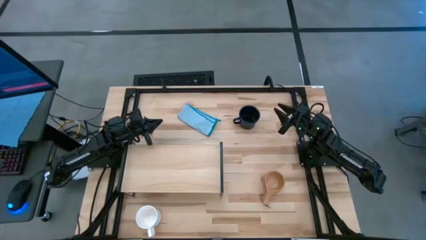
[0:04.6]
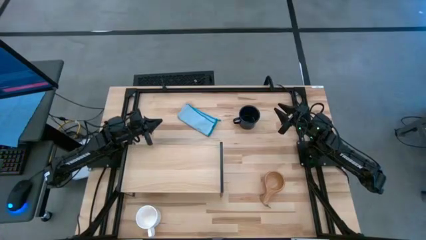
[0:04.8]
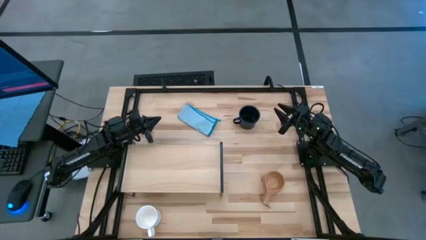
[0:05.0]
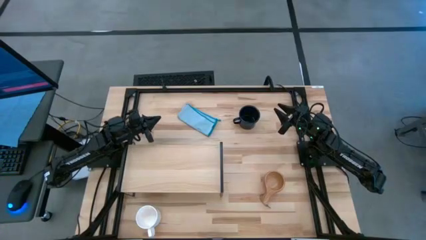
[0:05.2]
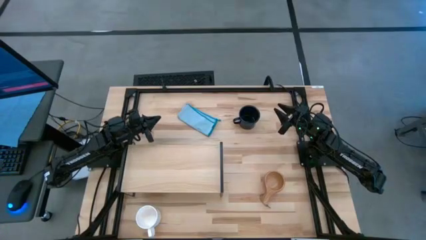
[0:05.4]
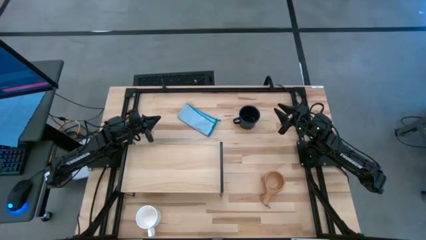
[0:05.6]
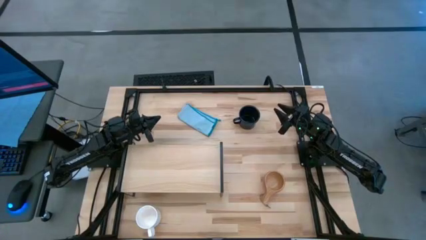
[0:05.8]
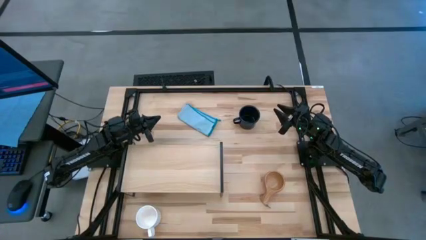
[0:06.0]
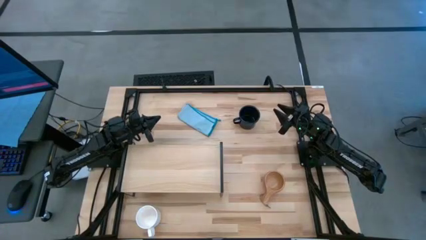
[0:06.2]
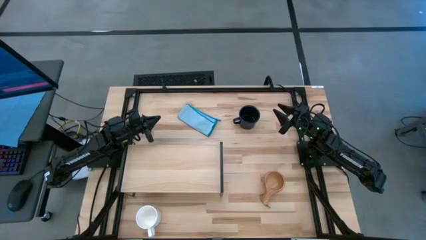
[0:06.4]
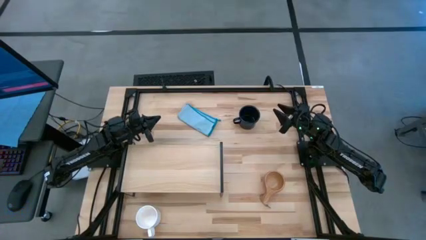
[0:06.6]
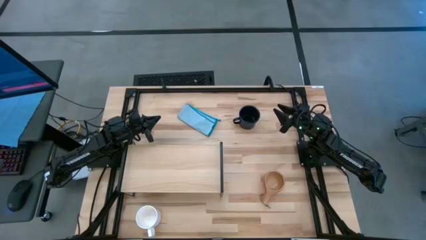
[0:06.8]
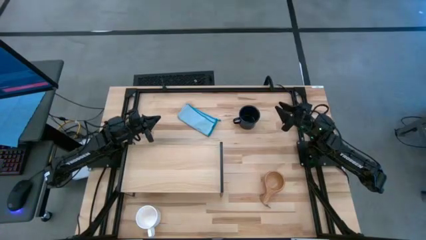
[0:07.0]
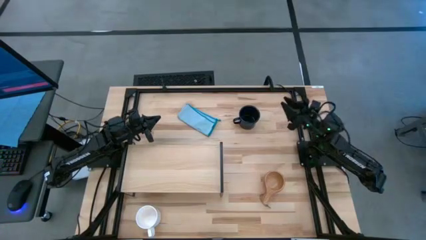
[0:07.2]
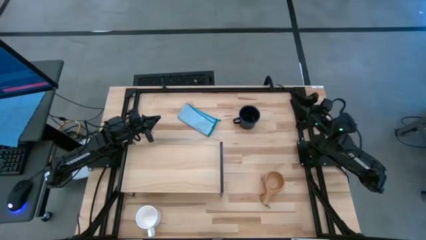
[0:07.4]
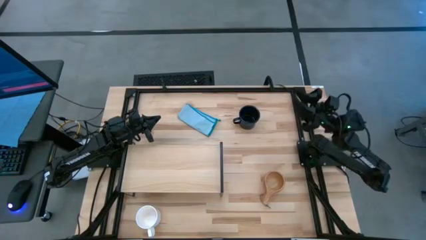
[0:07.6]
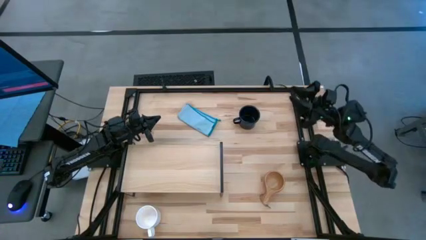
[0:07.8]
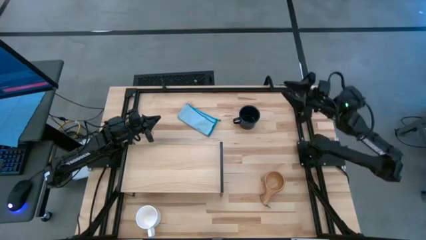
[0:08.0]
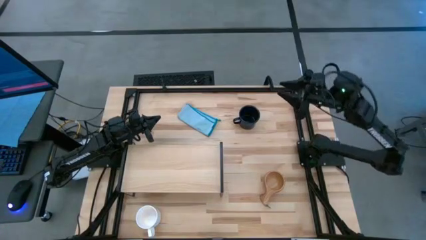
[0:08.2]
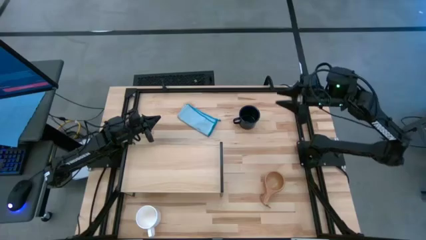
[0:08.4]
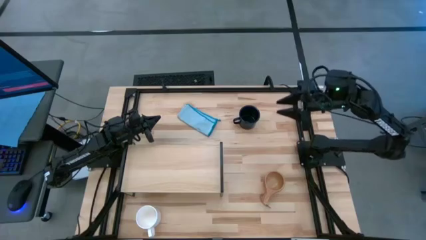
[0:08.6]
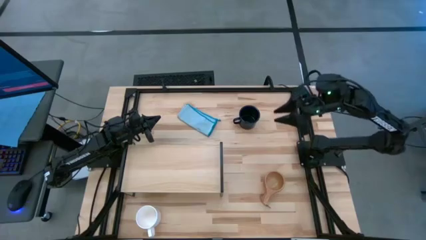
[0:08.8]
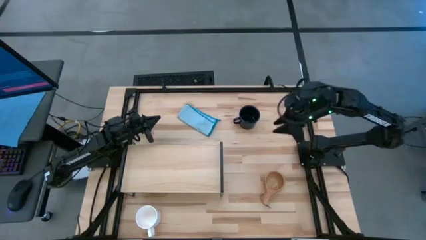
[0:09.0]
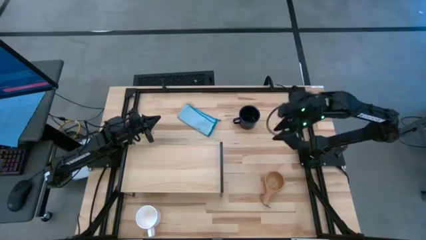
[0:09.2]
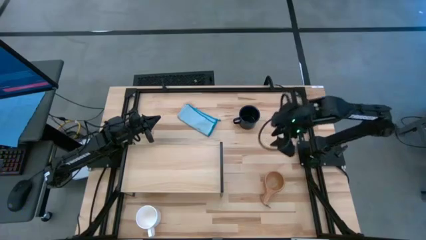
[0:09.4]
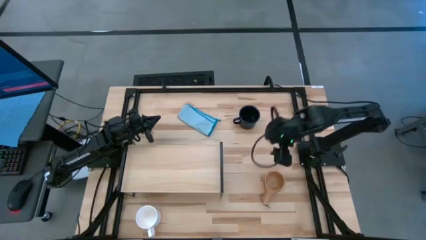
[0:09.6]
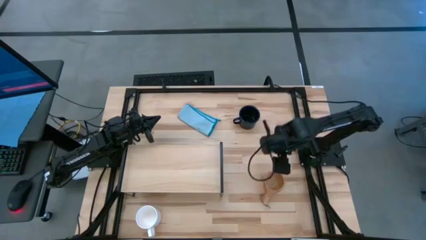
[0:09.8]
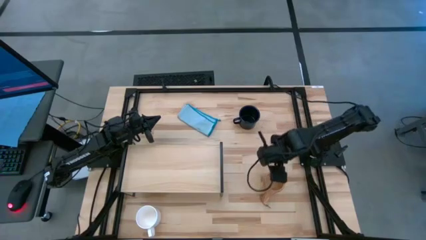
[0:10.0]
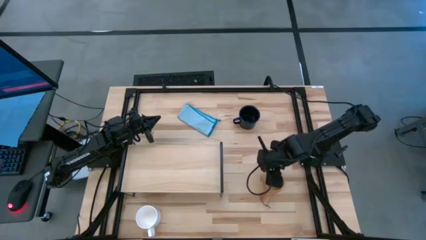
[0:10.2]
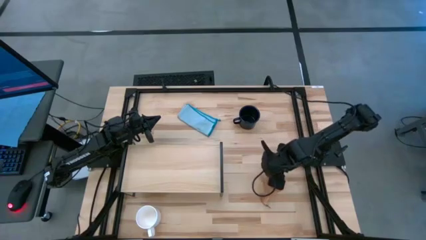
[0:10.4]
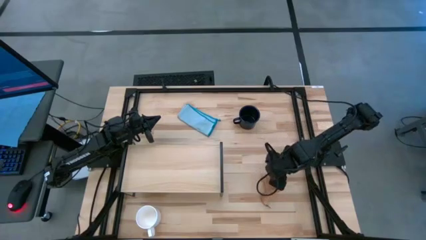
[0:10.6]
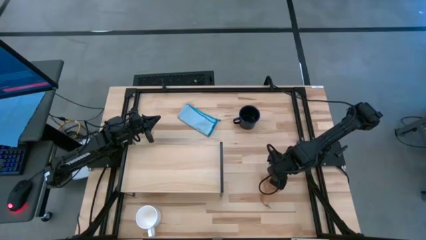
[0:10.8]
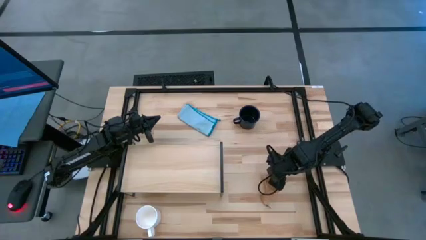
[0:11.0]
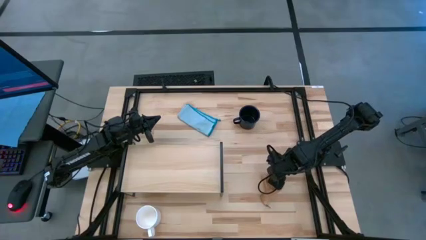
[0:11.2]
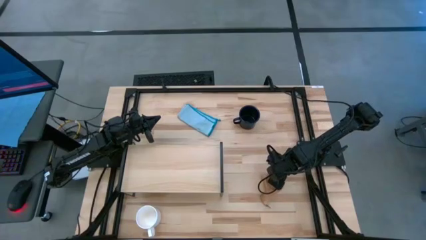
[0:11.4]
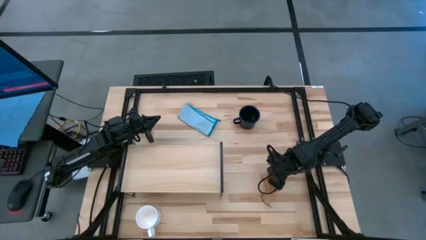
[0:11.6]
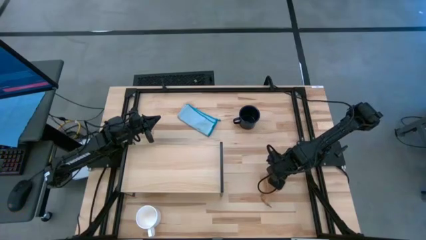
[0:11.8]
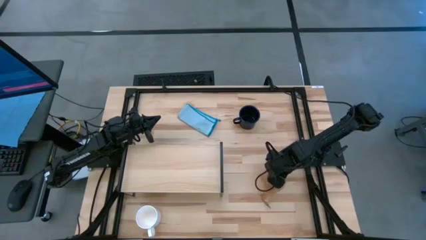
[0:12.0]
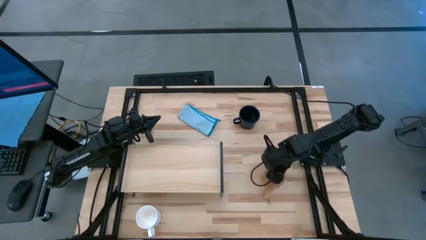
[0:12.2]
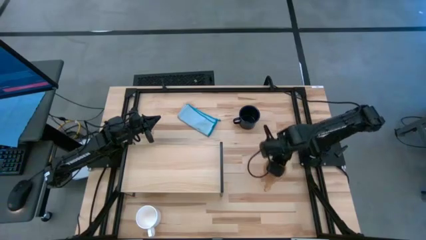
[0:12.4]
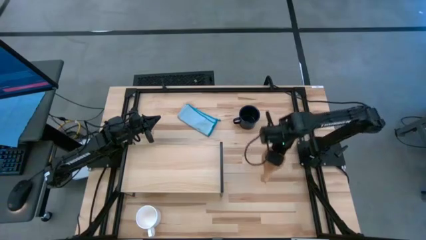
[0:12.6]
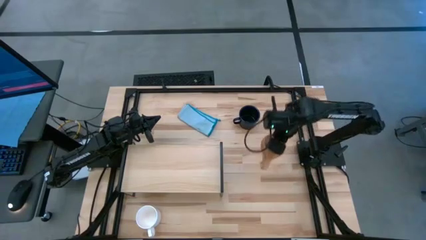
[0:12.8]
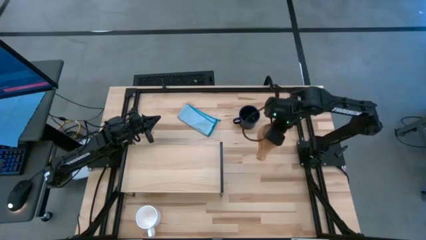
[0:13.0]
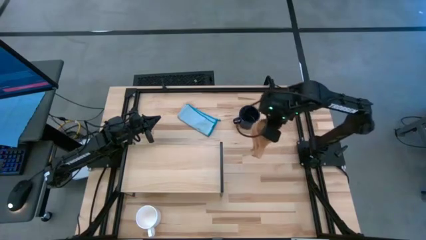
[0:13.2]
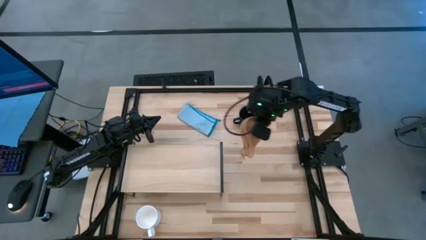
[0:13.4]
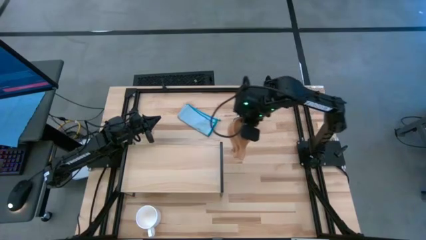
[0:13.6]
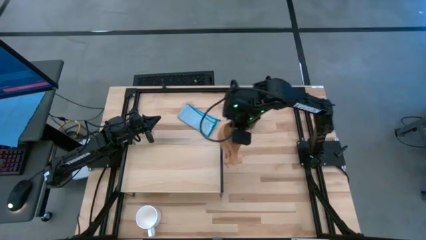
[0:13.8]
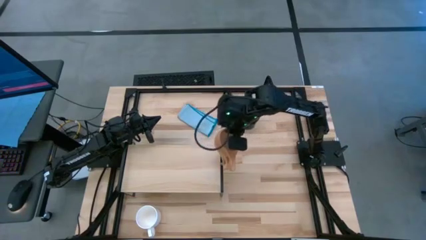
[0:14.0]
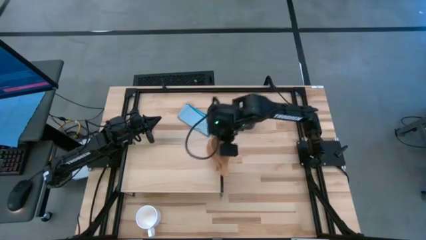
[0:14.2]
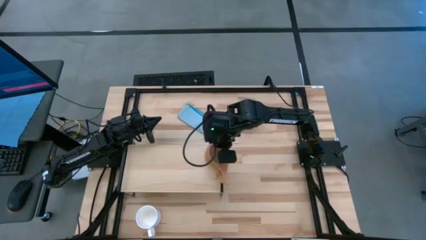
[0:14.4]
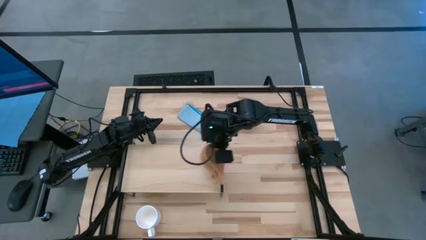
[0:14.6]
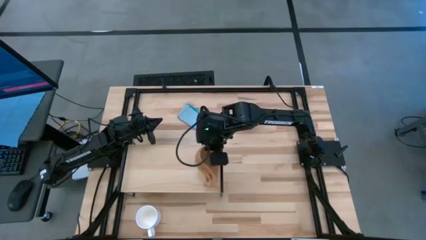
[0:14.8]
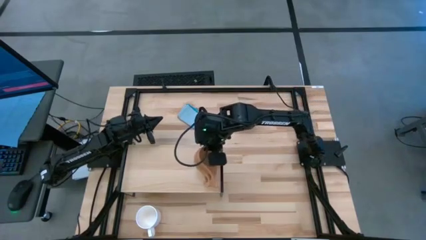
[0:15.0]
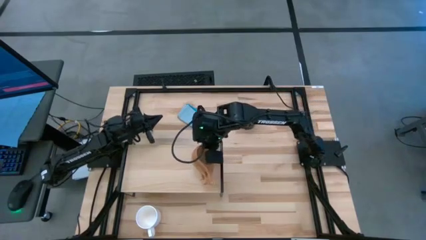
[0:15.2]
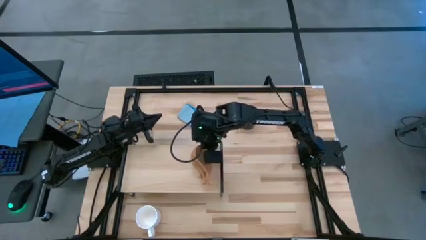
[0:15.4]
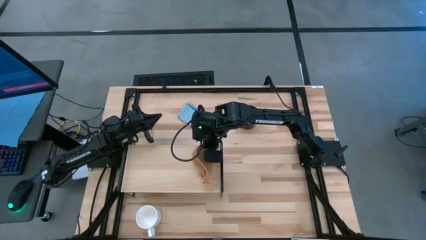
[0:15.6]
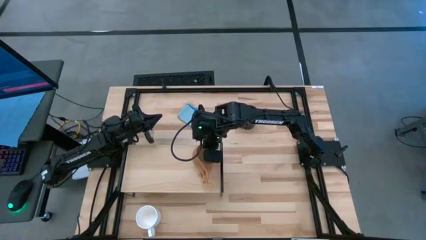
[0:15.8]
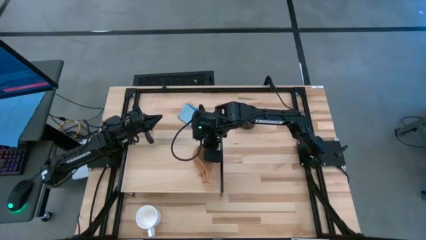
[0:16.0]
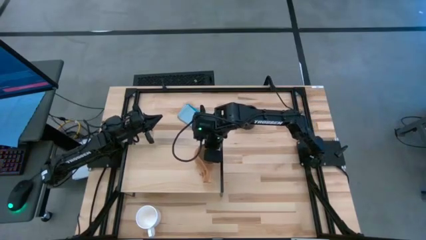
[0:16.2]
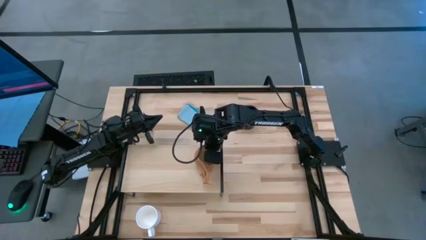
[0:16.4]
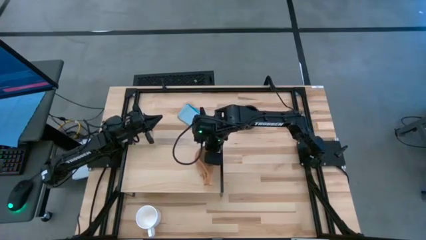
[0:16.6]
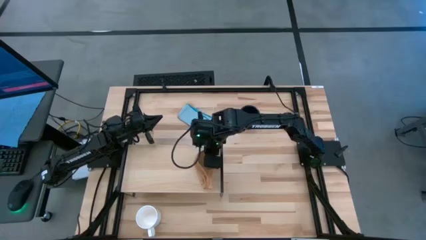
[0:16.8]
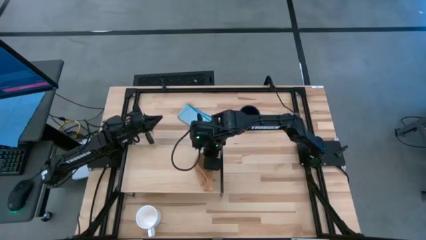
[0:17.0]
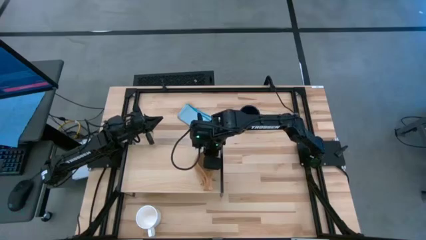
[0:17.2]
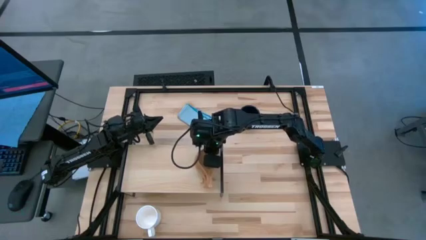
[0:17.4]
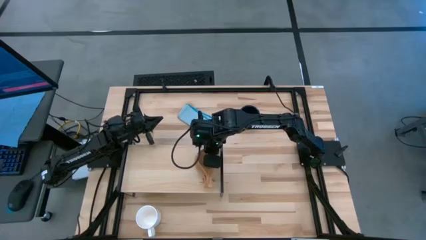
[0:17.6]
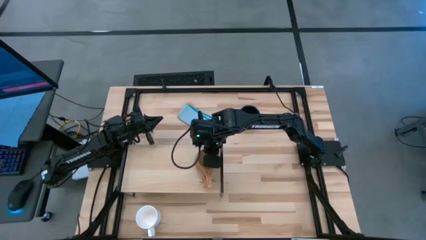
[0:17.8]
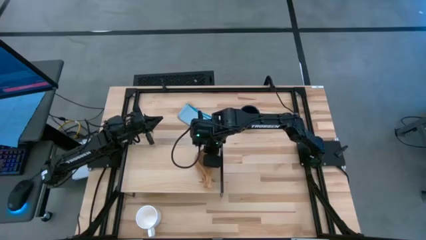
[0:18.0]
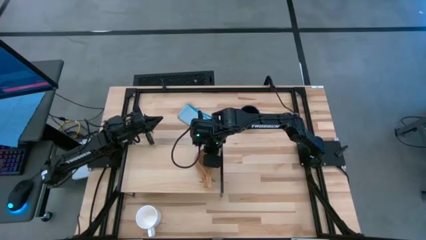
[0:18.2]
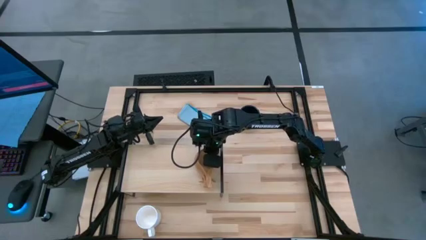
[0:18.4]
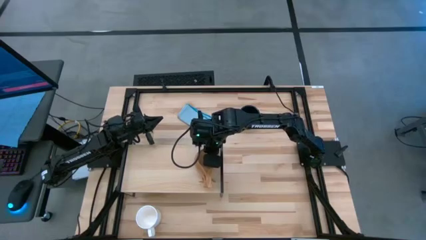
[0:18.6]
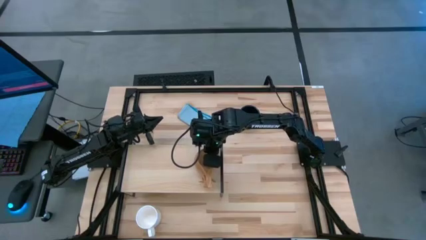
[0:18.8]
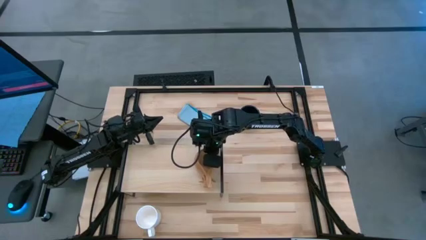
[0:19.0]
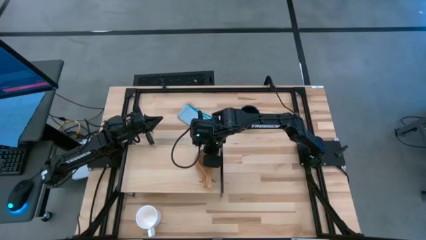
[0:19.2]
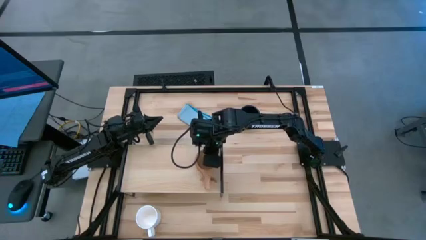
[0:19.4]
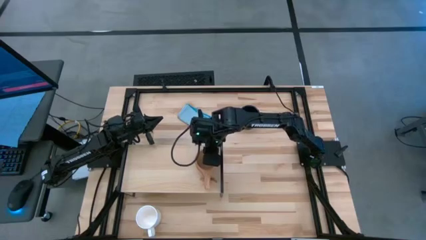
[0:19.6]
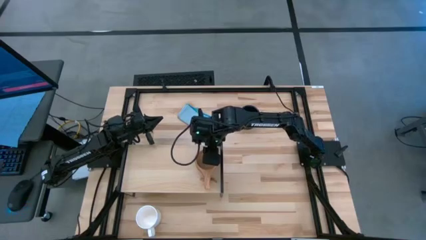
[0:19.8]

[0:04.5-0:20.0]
Task: Stack small to large cups/mugs on shelf
Put the brown wooden cup on the shelf
